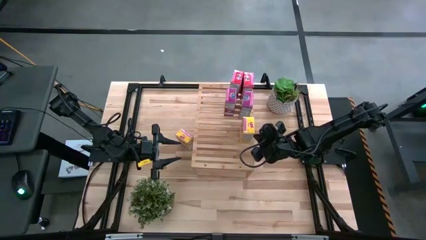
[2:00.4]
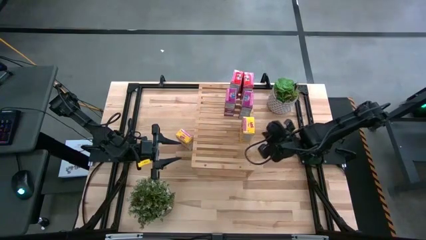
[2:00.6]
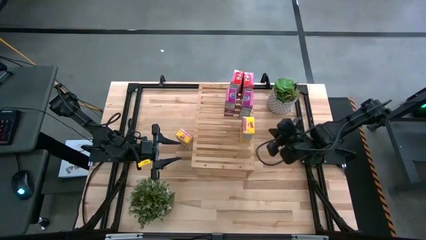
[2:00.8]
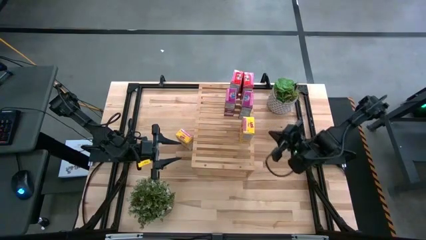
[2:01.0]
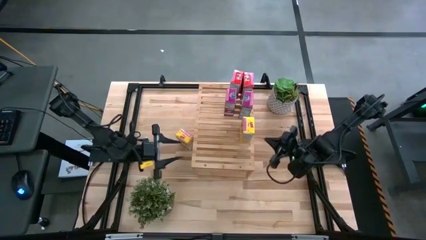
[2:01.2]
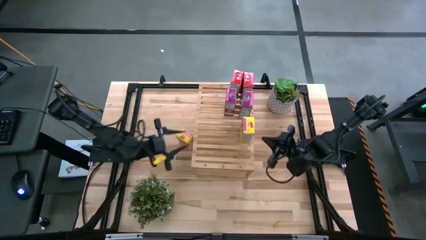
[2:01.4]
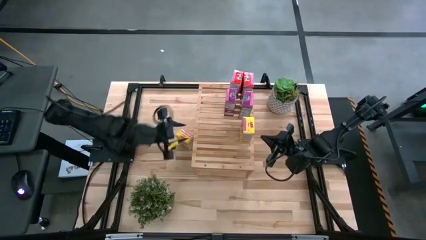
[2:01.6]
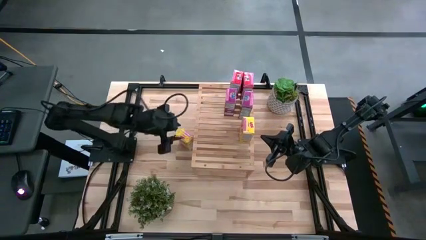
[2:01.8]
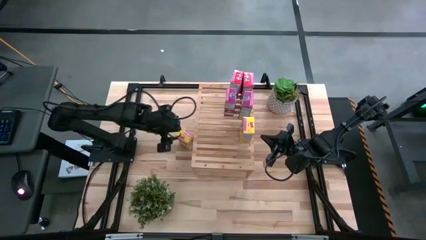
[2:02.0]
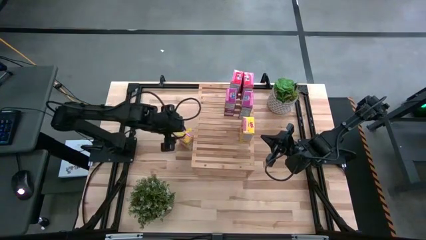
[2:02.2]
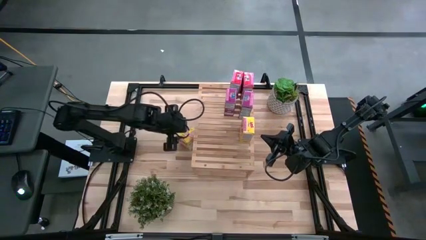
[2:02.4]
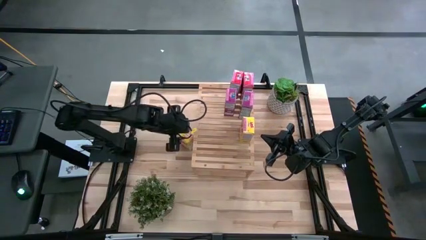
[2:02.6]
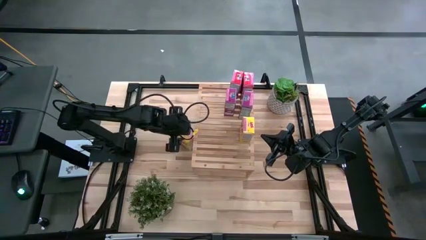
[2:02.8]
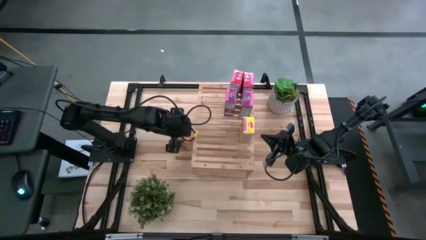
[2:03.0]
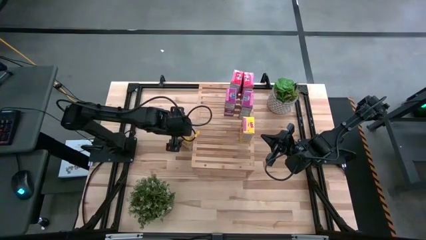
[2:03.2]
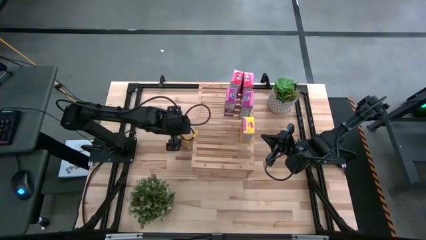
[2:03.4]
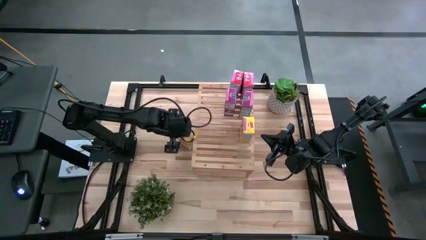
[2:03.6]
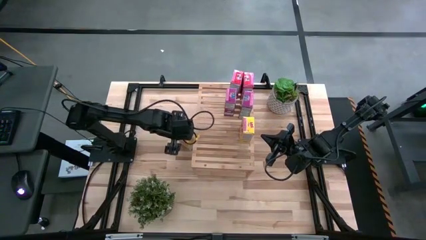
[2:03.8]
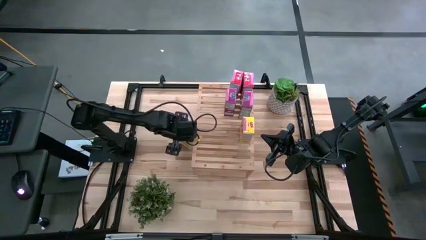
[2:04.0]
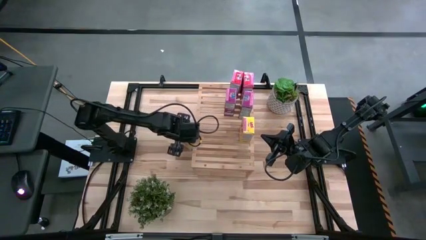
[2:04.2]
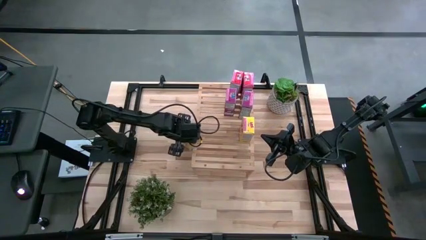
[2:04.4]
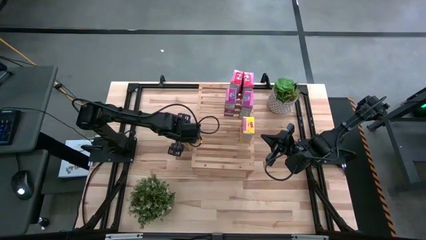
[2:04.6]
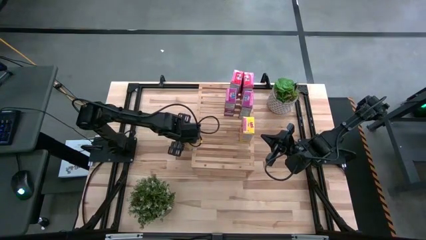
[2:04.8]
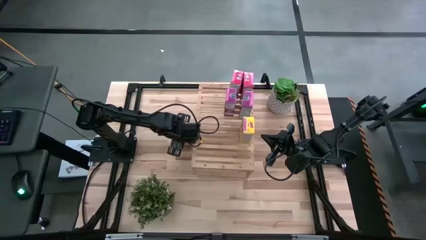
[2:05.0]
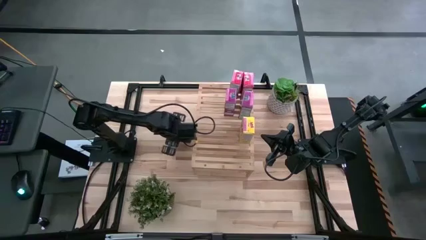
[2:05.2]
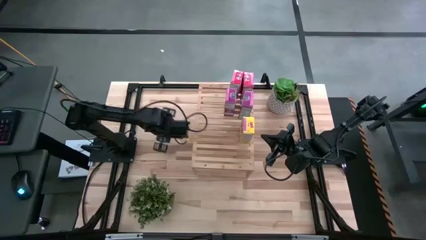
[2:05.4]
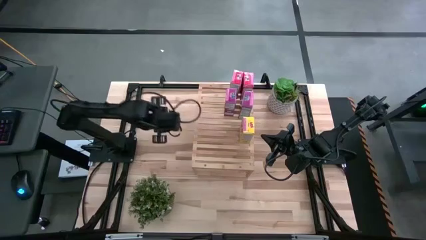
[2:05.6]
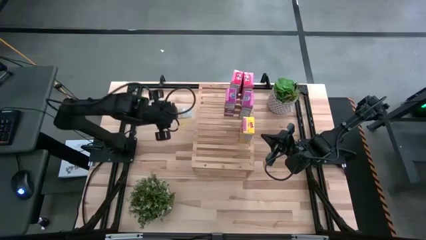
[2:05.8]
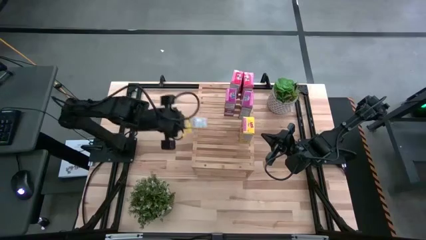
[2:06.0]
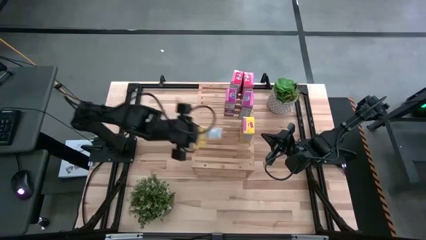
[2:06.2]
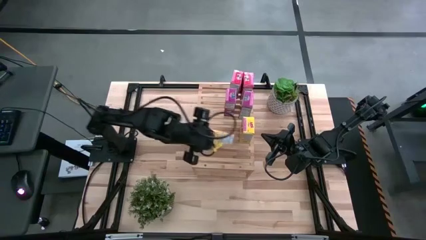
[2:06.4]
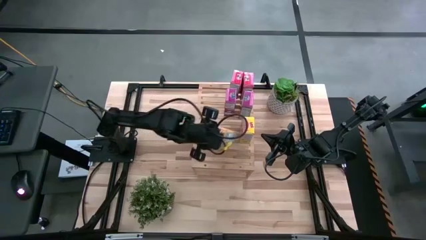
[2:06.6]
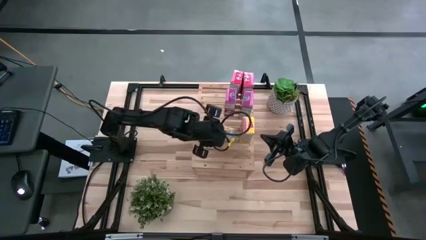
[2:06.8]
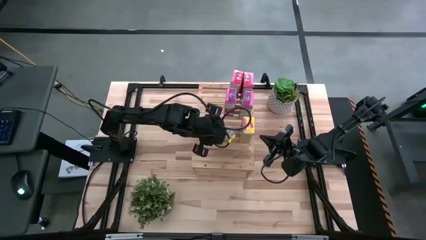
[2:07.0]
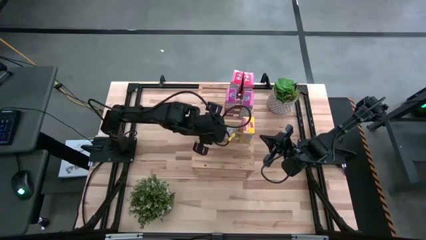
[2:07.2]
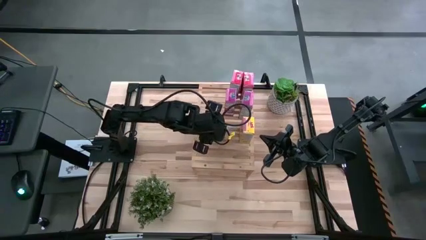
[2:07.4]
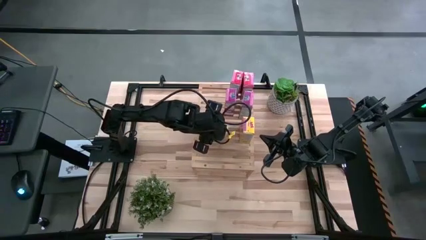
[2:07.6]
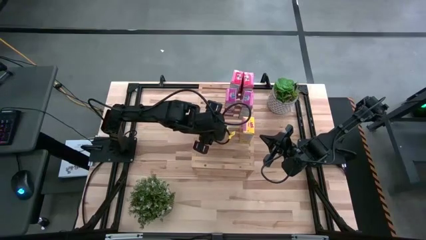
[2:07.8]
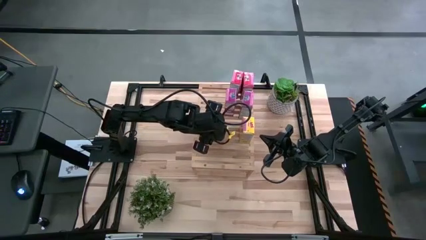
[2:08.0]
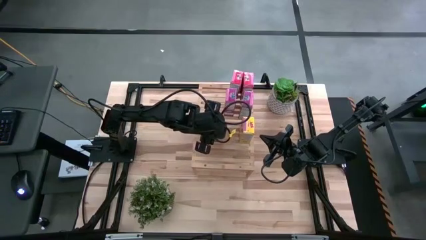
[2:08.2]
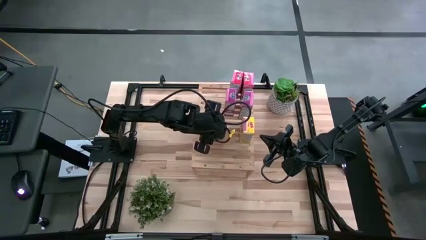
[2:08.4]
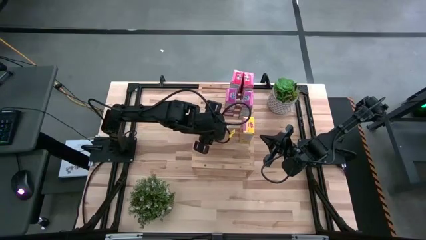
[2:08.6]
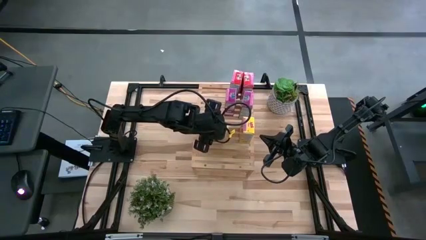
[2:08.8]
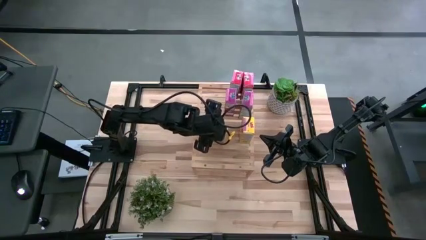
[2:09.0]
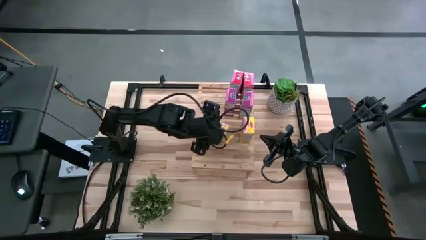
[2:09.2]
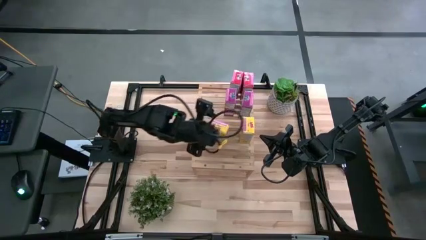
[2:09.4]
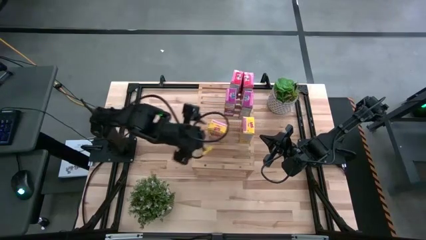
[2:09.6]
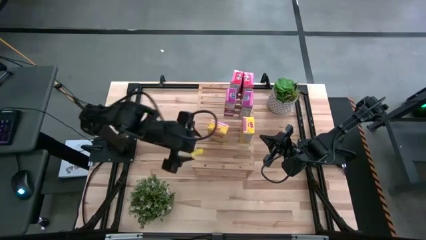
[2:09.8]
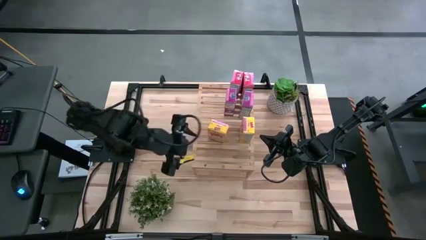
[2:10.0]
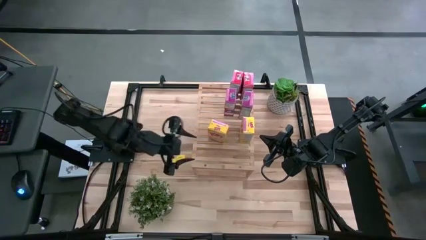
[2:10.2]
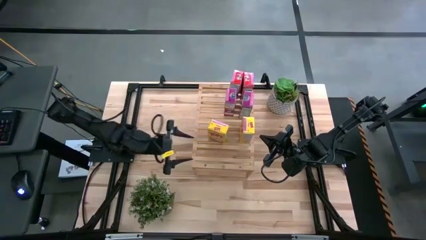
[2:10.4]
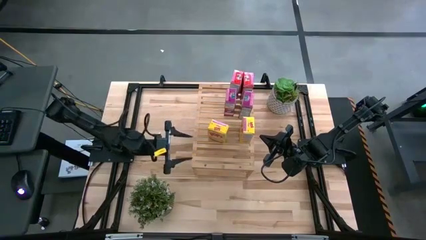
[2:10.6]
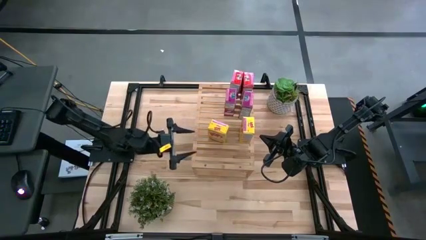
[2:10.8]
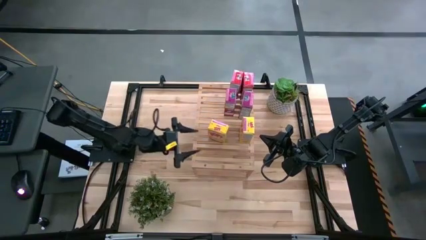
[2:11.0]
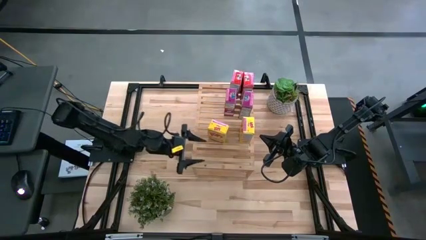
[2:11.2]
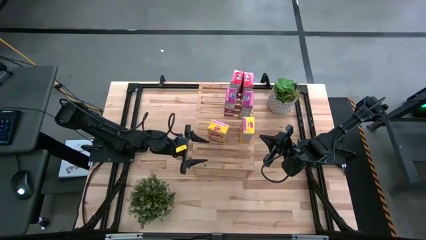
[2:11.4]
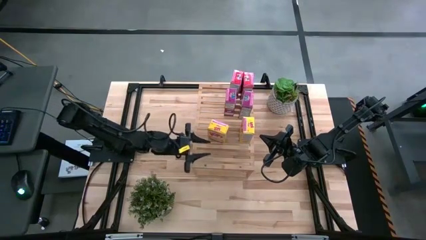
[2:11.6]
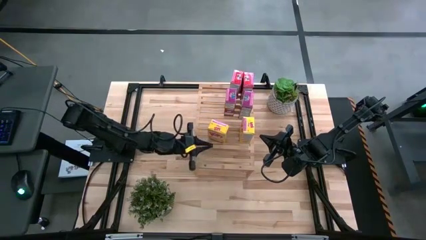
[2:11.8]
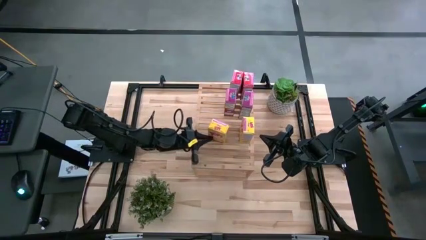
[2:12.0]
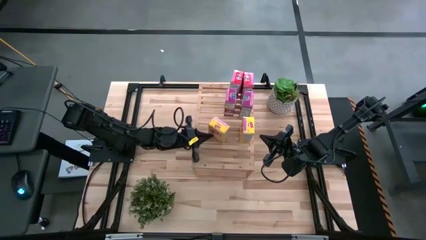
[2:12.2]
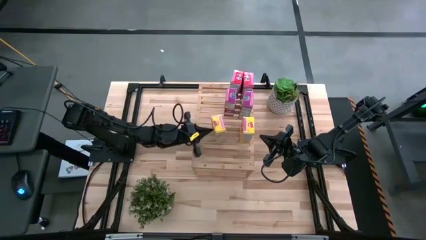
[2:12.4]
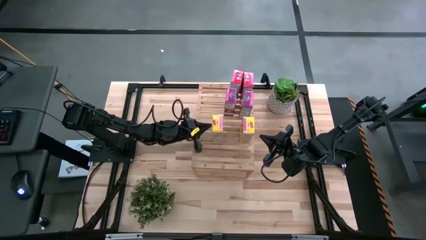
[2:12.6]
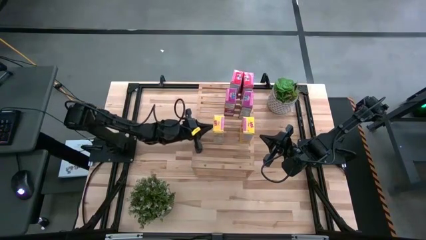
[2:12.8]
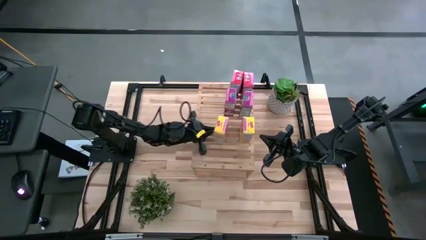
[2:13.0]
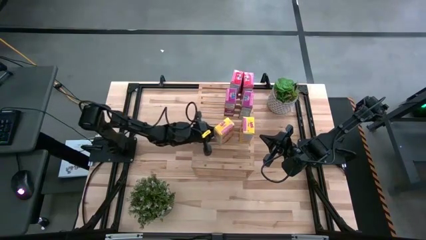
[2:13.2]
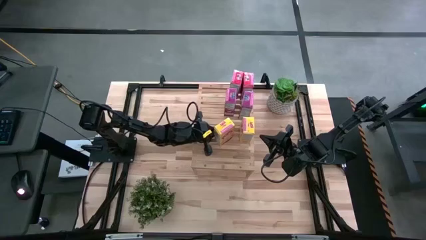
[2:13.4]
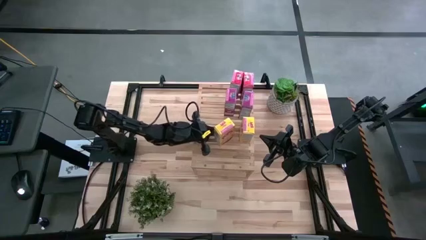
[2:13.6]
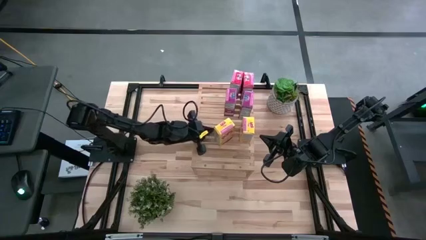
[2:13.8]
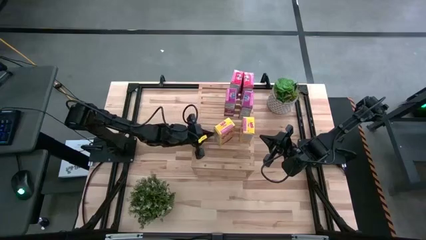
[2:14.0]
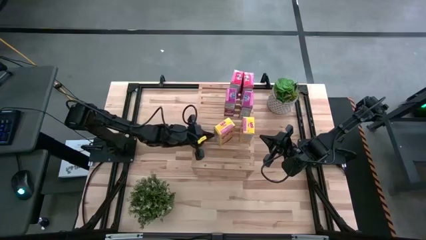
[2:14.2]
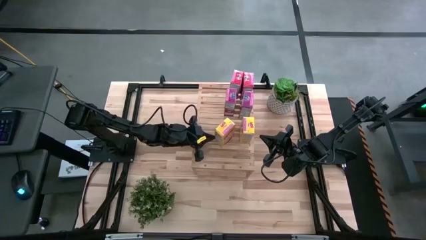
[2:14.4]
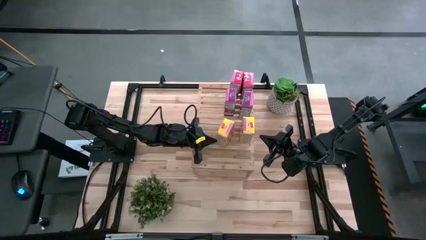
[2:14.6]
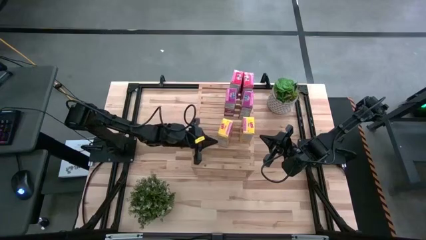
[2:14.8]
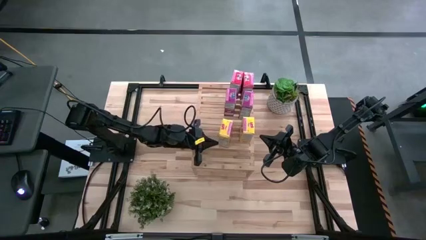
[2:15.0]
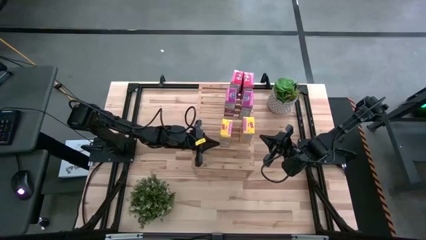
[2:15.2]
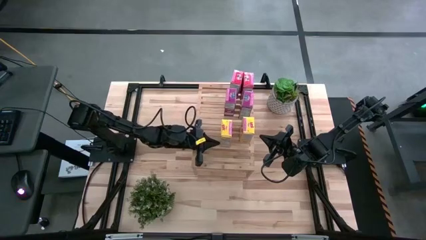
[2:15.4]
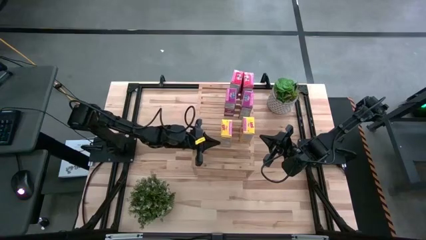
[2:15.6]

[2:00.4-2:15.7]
Task: Stack cereal on shelf
Put the yellow cereal box on the shelf aligned with the other yellow cereal box

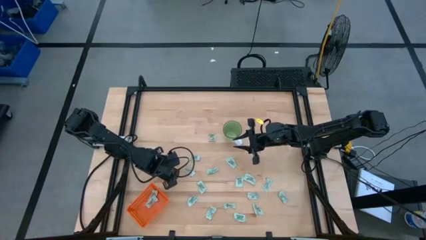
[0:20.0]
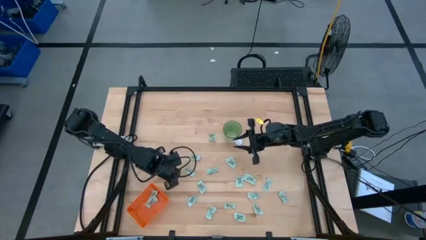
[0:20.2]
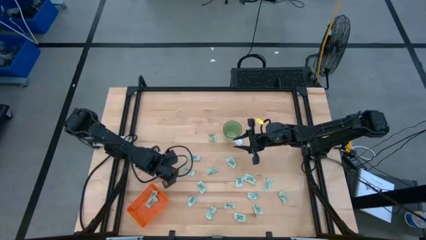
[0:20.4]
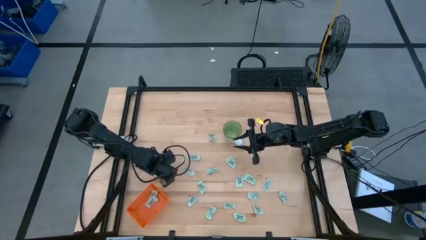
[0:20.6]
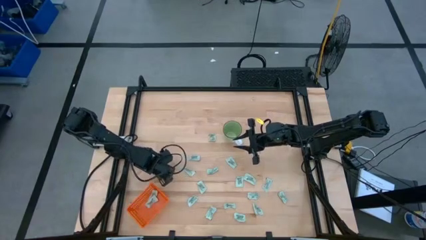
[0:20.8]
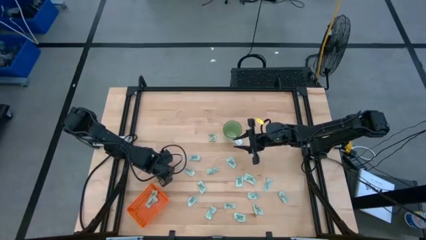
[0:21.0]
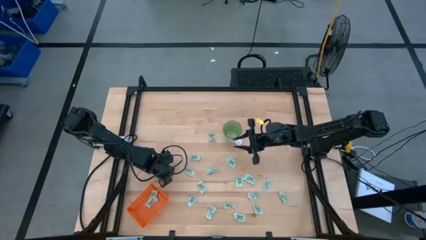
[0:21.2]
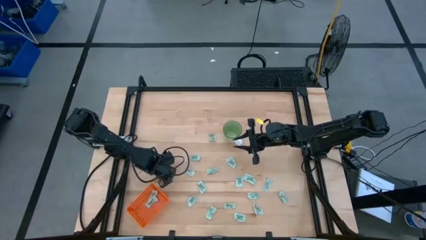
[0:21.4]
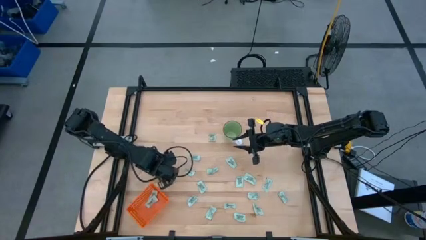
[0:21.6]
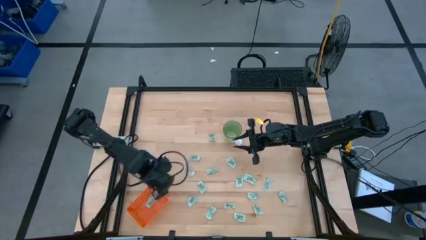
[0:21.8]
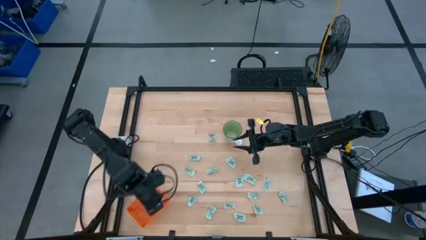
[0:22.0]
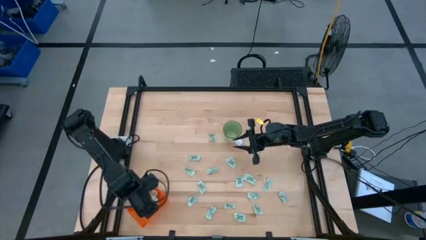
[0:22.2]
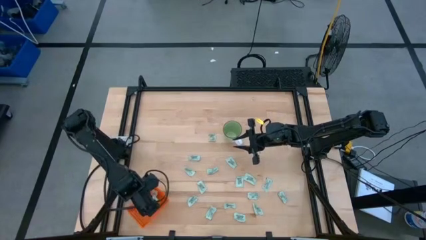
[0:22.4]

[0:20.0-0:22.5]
Task: Pick and place Stevia / Truvia into bins
Put the light green stevia packet into the orange basket
